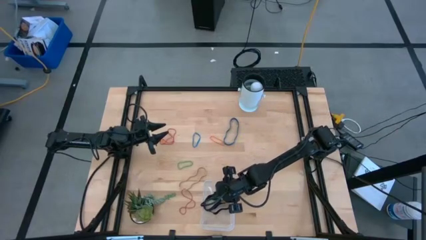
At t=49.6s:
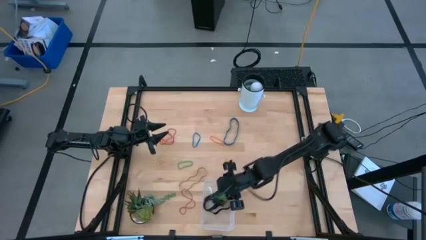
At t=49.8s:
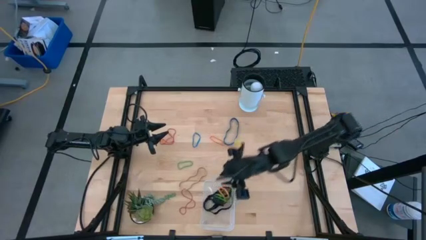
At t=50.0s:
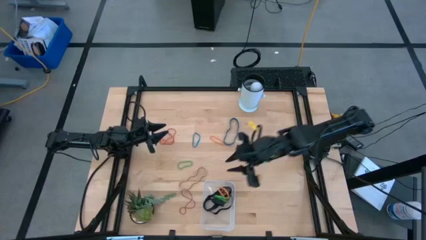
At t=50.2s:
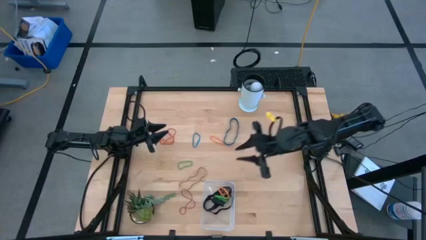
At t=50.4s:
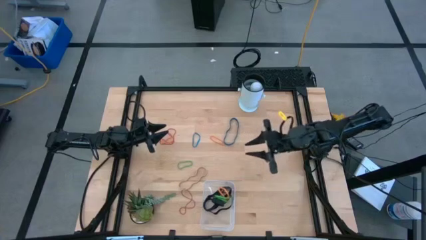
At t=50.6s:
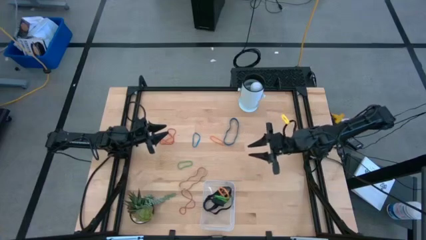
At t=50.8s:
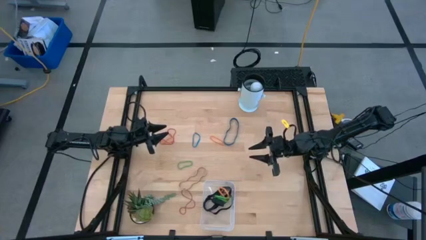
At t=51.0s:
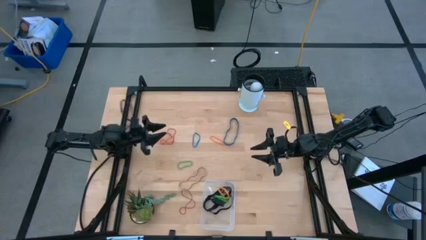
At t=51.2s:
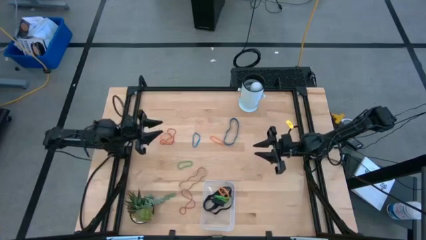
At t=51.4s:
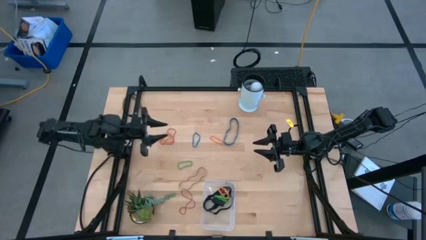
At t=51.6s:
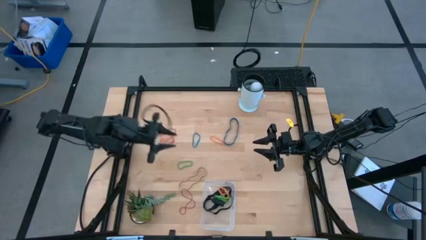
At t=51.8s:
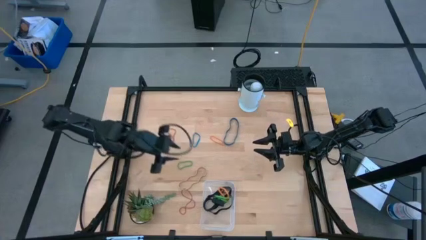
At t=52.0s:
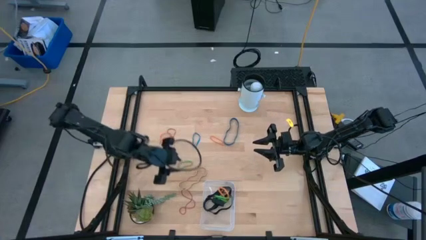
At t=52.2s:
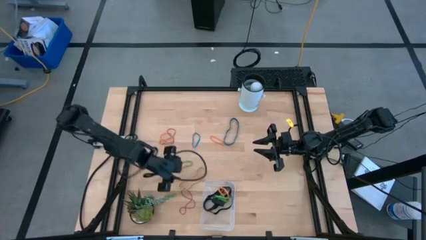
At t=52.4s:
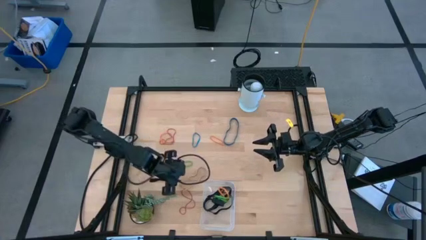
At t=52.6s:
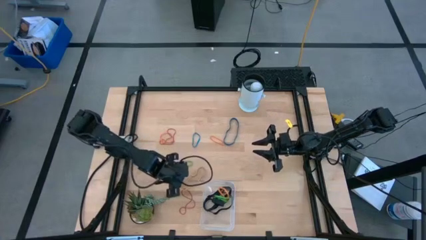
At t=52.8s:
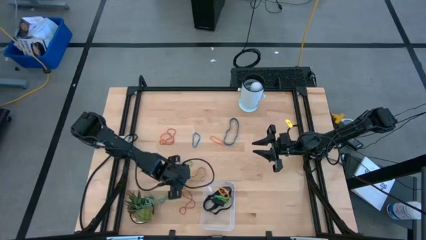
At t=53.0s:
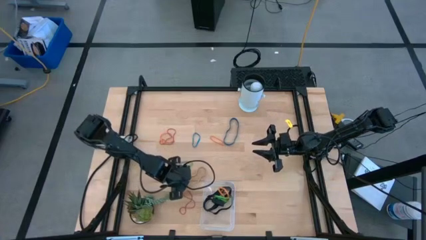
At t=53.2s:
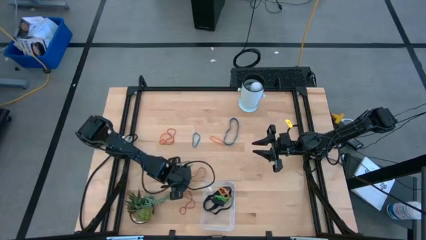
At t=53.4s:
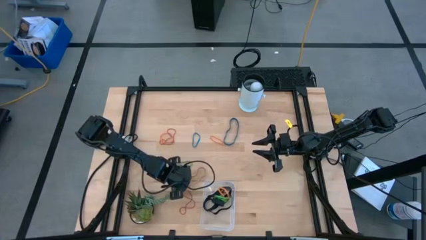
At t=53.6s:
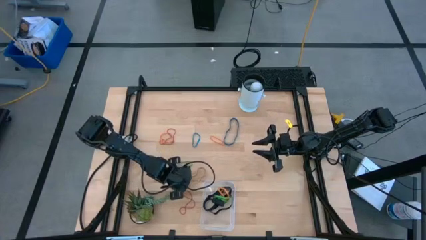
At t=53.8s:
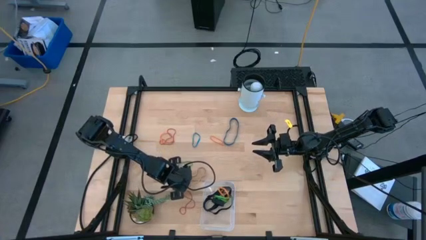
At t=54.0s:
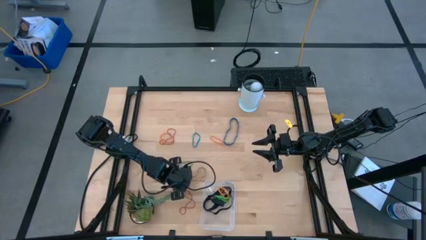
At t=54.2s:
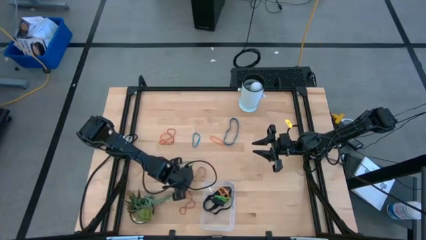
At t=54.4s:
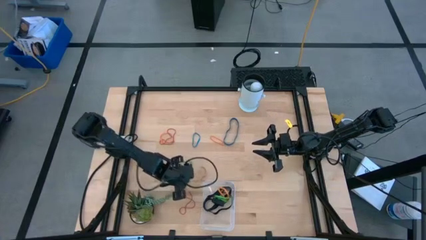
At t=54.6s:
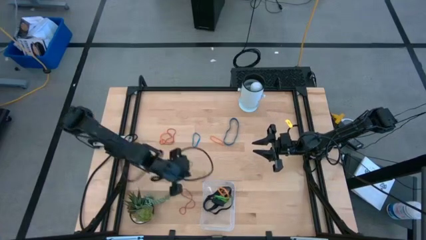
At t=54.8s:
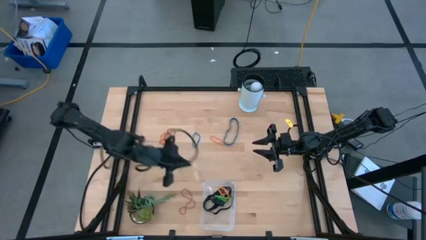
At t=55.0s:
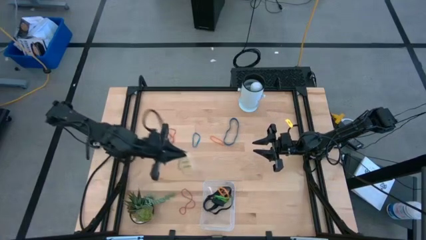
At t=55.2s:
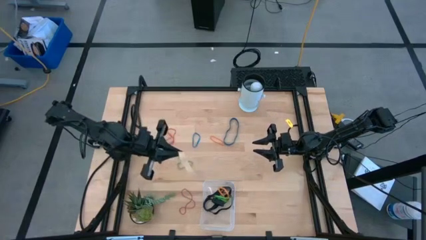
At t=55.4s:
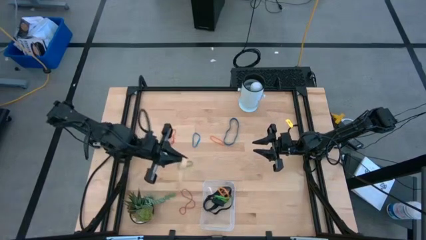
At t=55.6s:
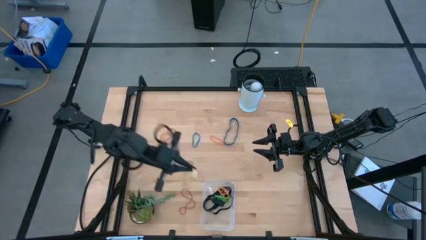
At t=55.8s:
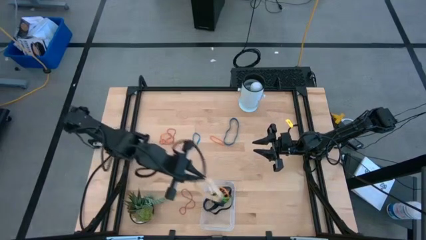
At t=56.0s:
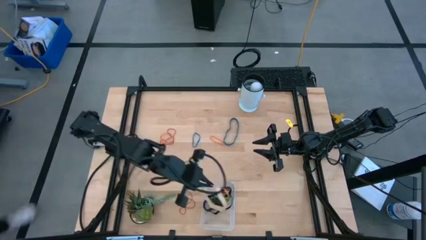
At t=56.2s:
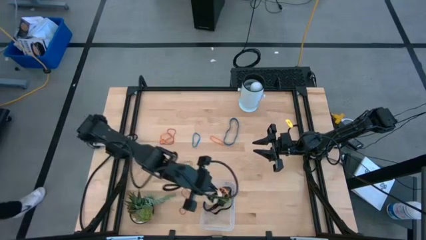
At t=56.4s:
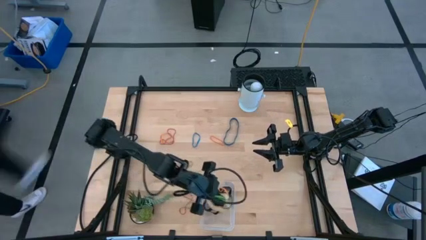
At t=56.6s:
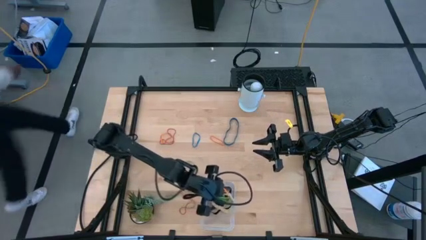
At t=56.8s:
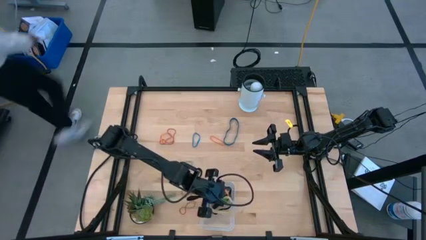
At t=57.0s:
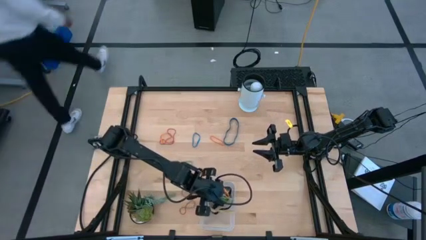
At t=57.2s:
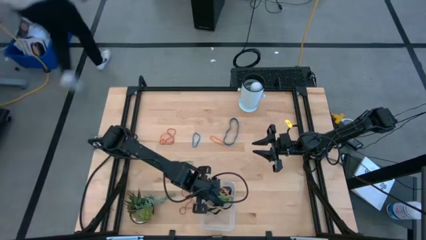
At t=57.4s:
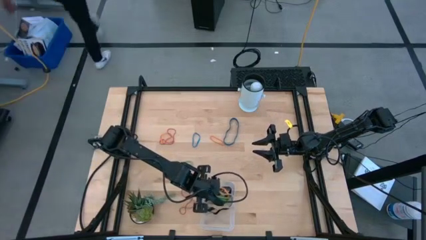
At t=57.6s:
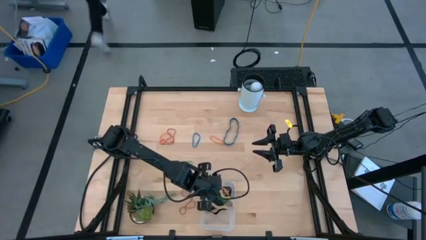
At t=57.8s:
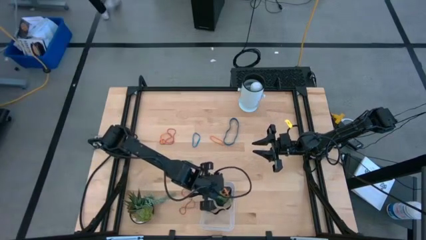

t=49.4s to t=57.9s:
Task: Pick and place rubber bands into bin
Put the light brown rubber band into the transparent bin

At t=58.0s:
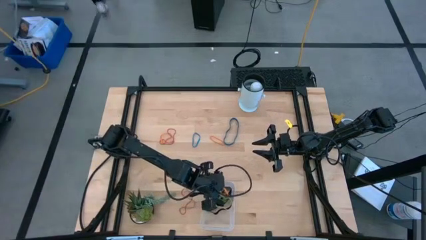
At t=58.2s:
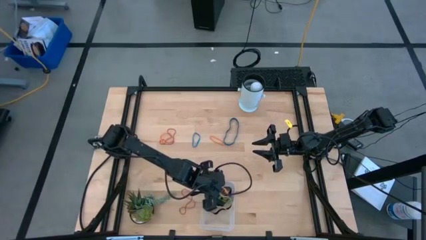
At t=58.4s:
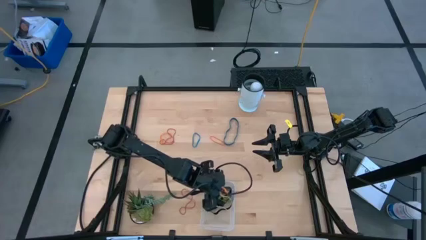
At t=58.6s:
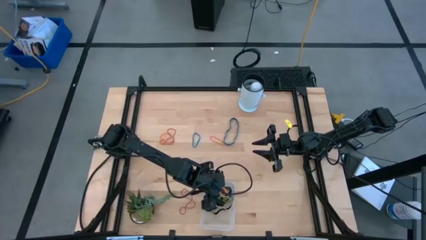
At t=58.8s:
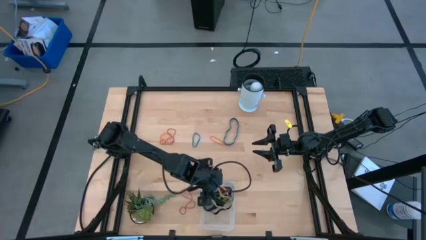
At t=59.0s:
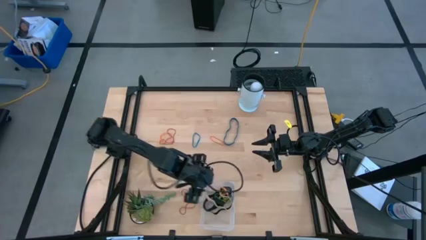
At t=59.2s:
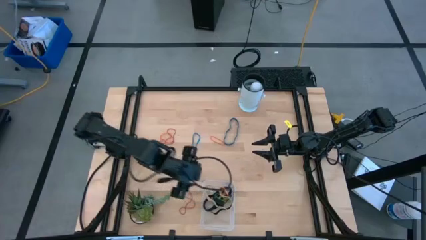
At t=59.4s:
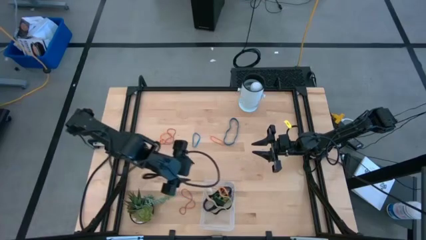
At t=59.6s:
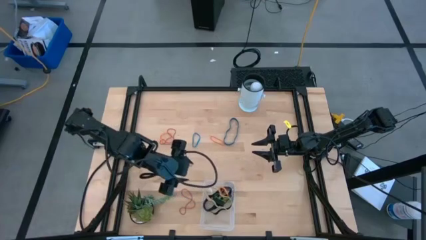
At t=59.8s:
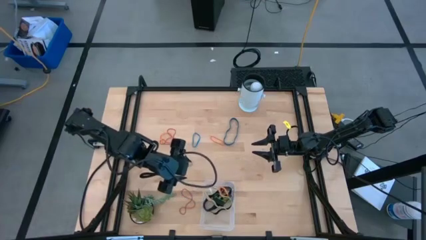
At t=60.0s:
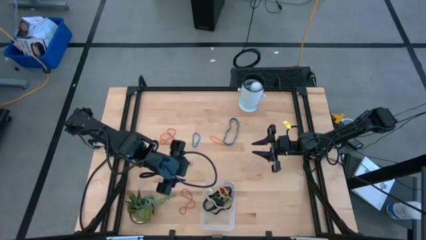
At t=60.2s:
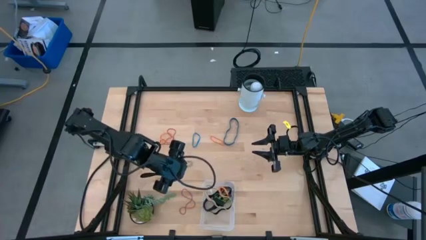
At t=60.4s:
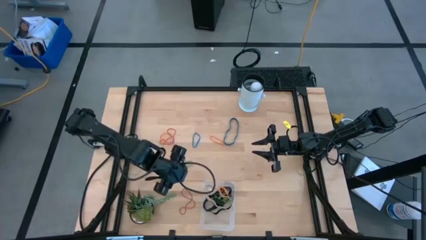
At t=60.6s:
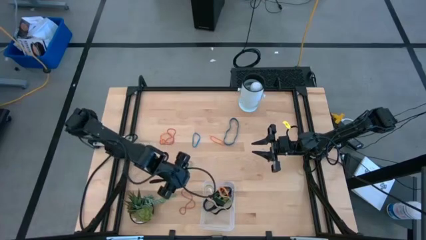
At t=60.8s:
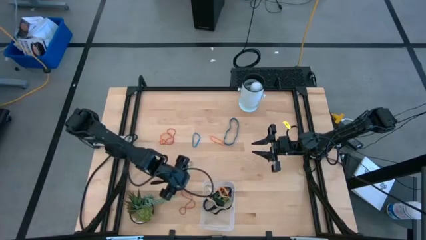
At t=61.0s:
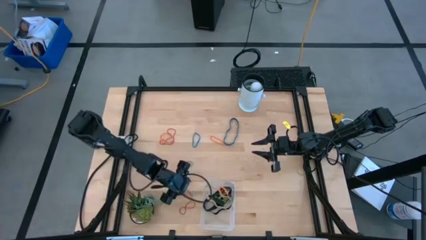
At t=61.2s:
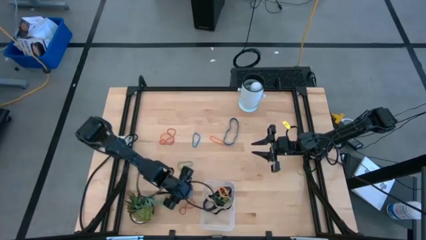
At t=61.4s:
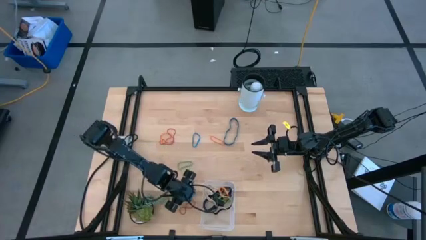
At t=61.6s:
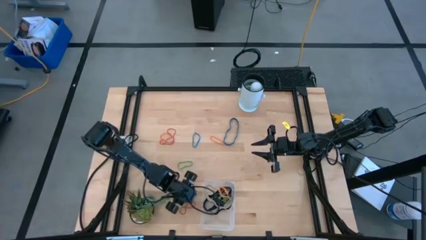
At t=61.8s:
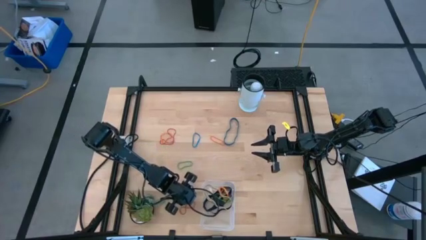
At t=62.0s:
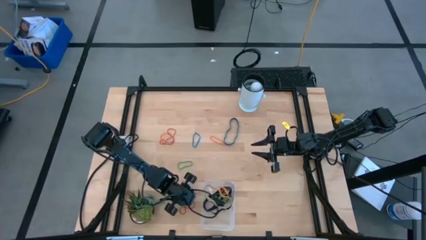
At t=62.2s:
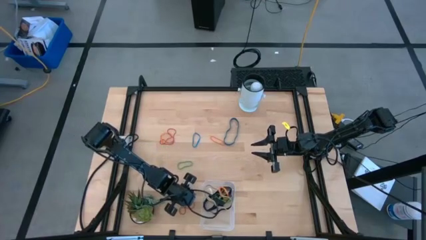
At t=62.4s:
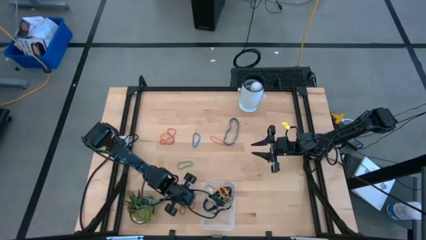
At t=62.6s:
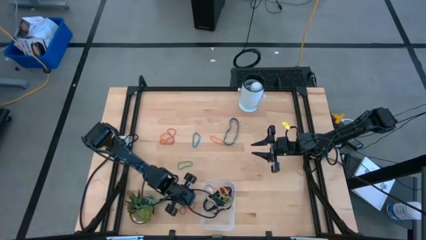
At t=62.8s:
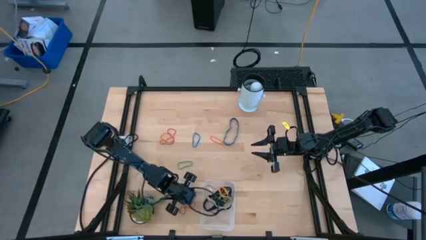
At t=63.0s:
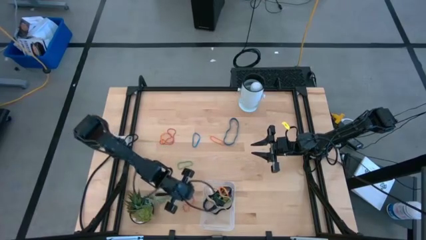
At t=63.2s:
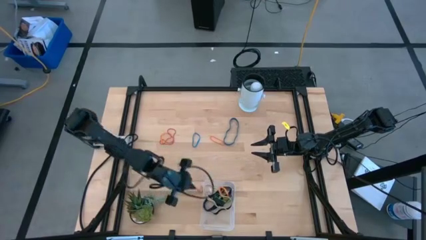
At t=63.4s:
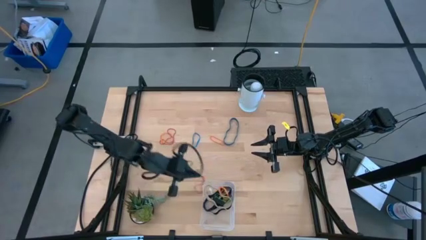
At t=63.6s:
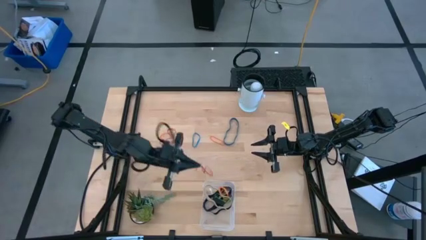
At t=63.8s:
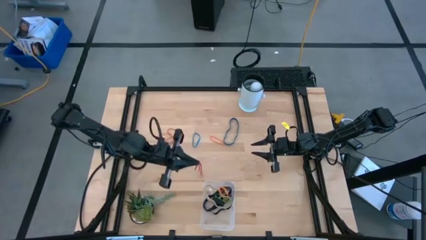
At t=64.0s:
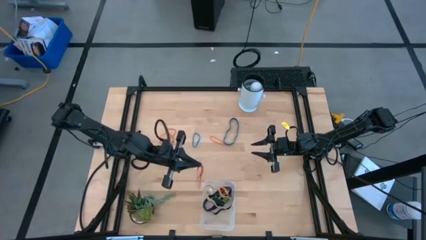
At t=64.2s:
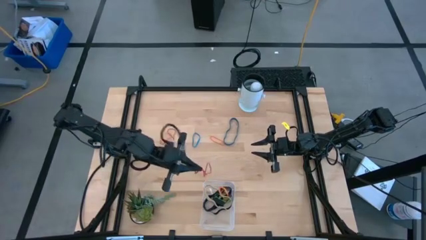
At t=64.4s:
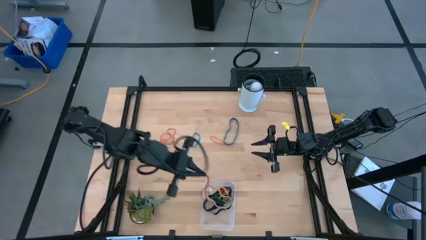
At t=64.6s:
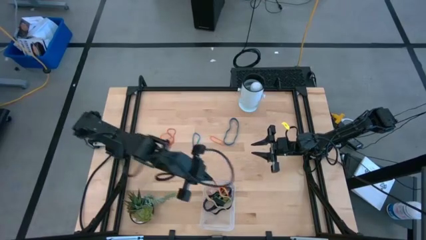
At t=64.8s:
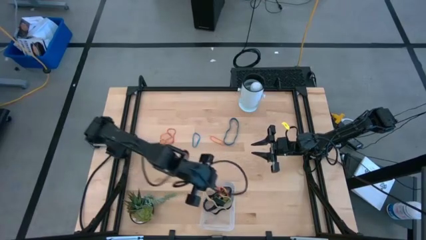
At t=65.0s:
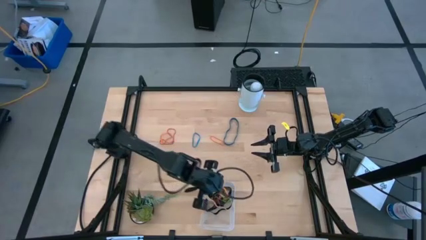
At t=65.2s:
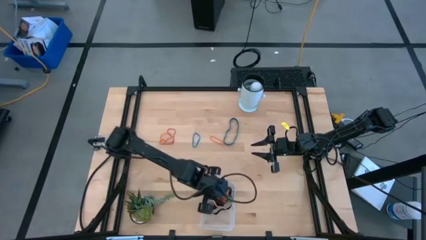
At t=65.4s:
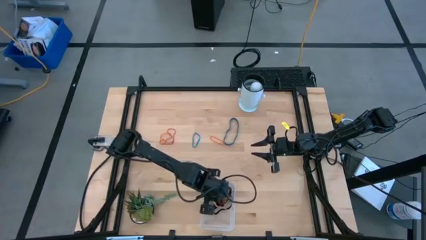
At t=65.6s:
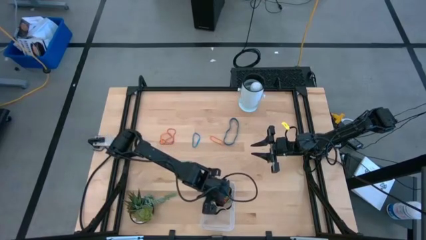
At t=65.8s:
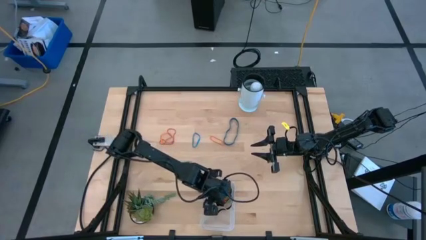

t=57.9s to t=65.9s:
Put the red rubber band into the transparent bin
